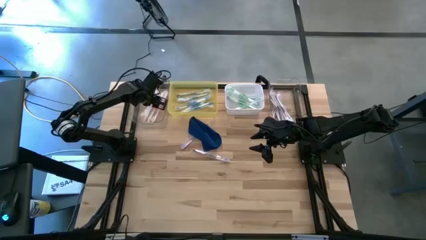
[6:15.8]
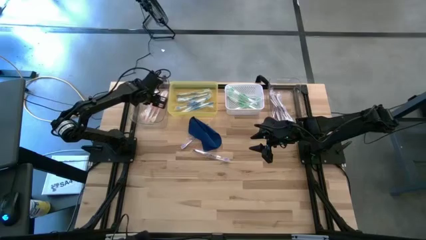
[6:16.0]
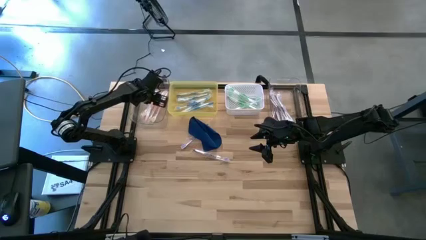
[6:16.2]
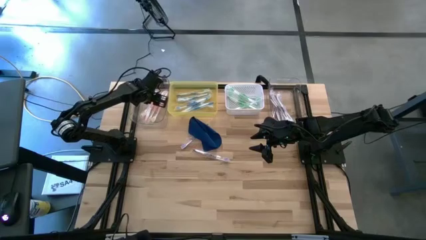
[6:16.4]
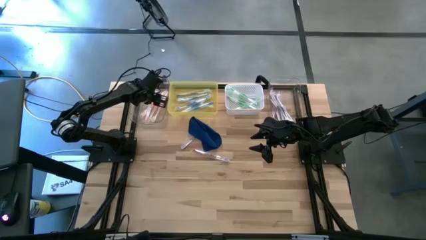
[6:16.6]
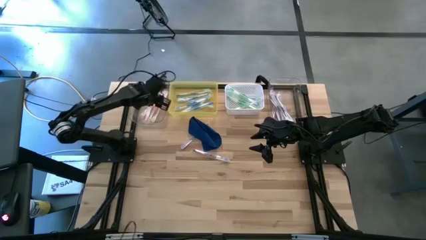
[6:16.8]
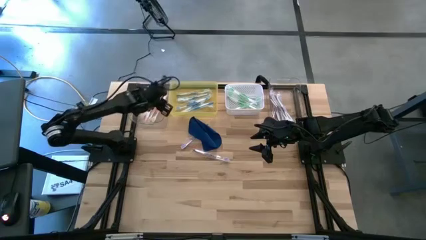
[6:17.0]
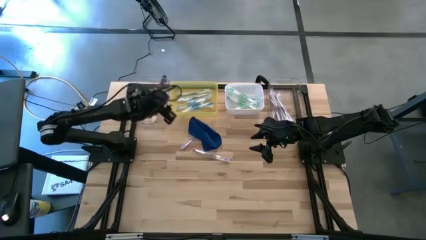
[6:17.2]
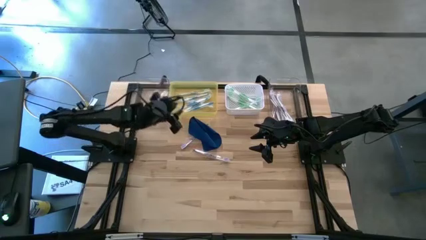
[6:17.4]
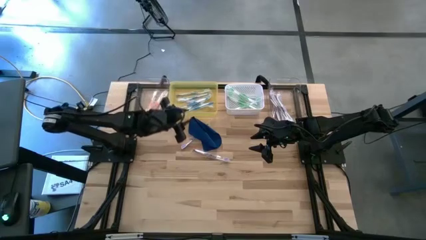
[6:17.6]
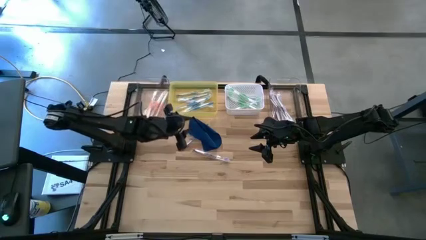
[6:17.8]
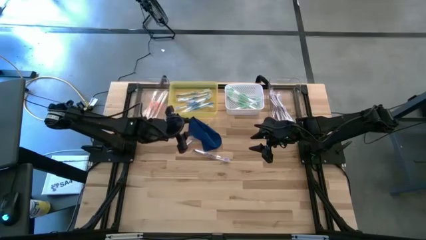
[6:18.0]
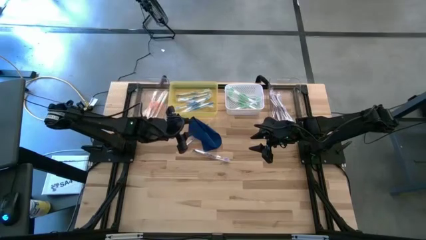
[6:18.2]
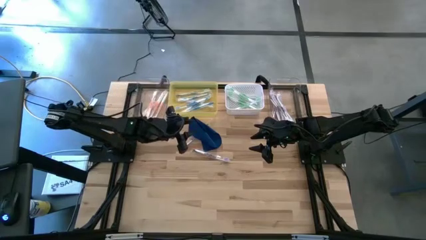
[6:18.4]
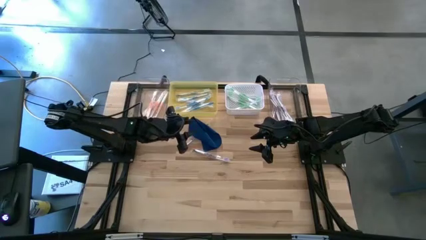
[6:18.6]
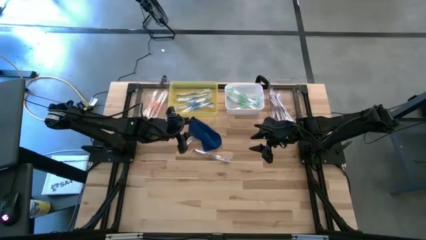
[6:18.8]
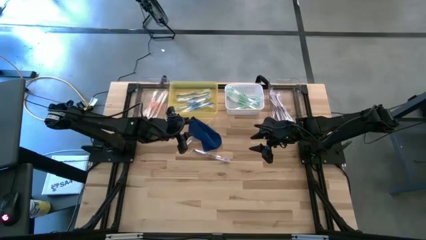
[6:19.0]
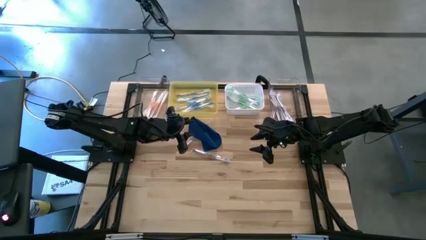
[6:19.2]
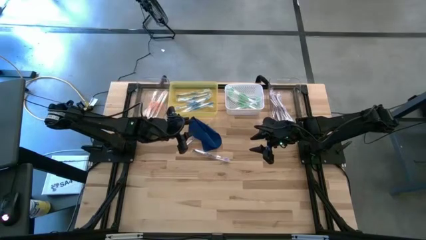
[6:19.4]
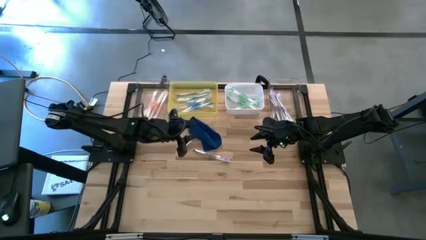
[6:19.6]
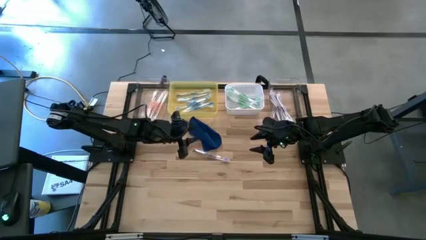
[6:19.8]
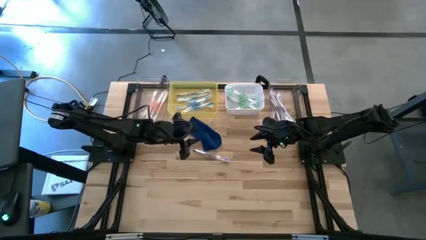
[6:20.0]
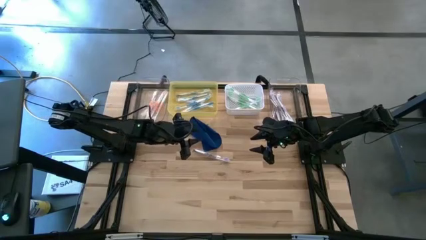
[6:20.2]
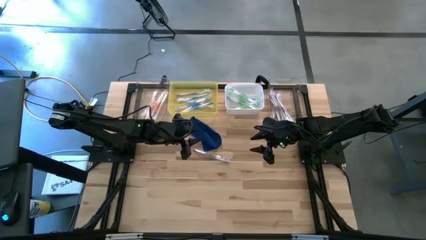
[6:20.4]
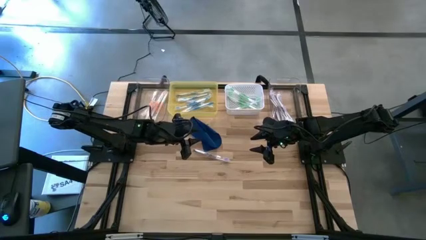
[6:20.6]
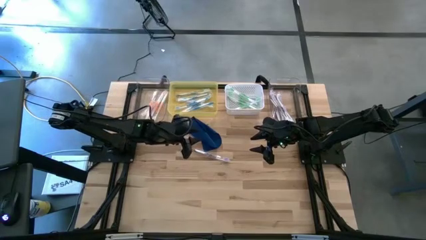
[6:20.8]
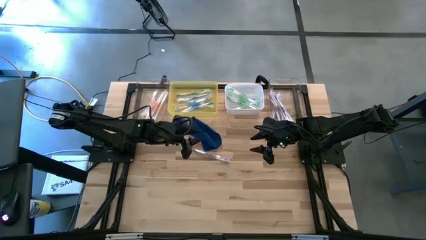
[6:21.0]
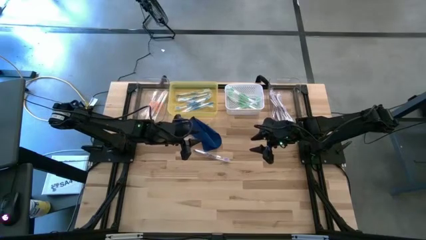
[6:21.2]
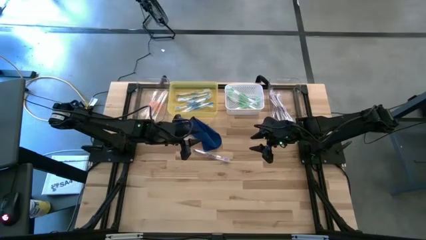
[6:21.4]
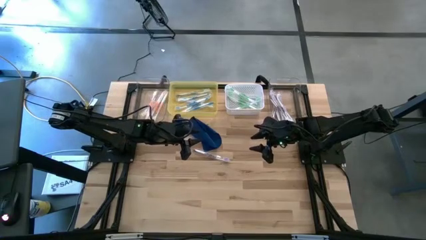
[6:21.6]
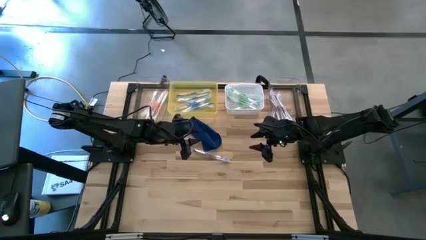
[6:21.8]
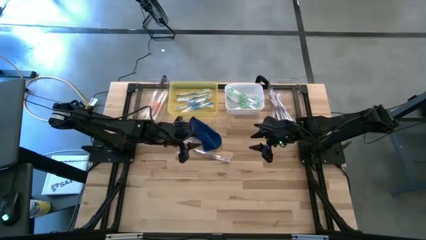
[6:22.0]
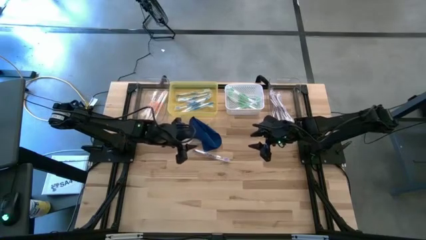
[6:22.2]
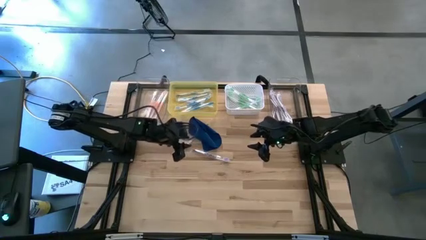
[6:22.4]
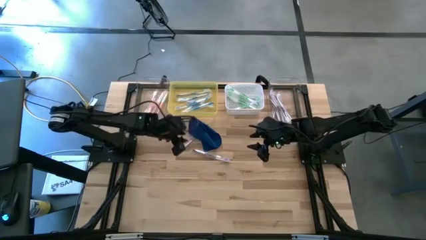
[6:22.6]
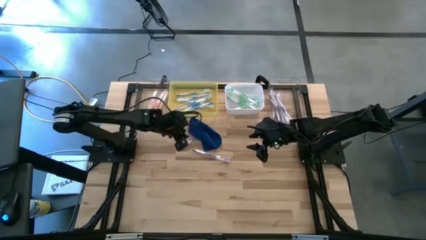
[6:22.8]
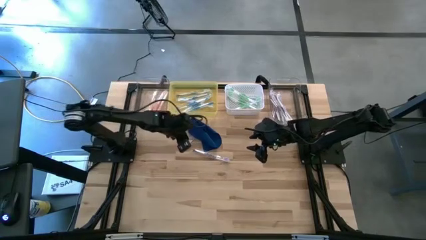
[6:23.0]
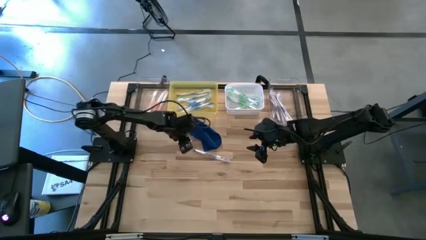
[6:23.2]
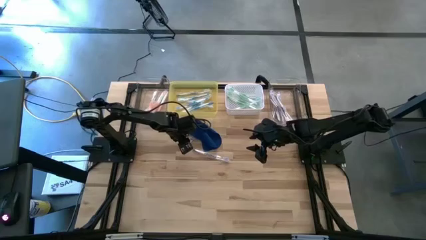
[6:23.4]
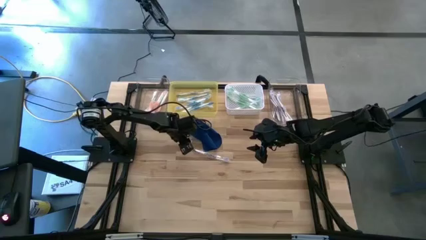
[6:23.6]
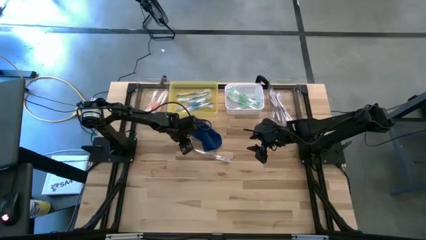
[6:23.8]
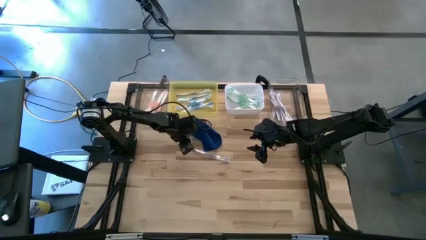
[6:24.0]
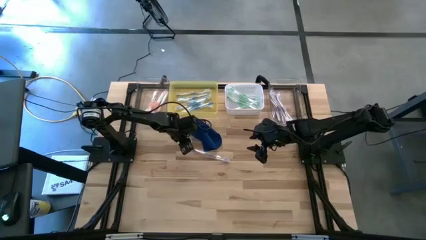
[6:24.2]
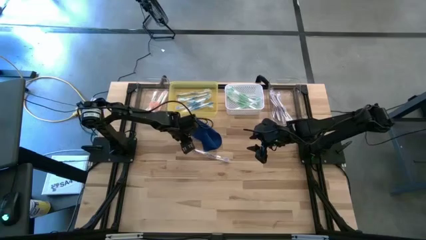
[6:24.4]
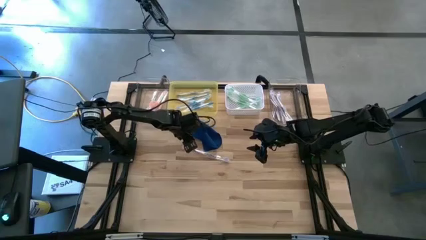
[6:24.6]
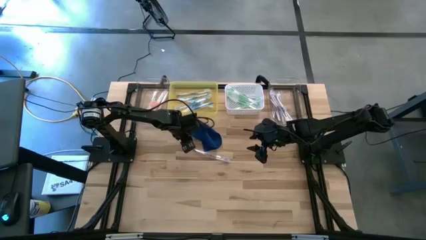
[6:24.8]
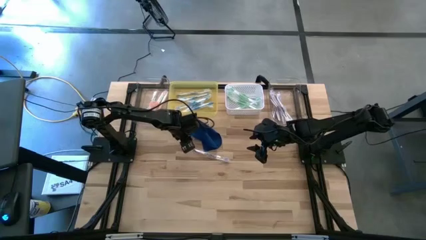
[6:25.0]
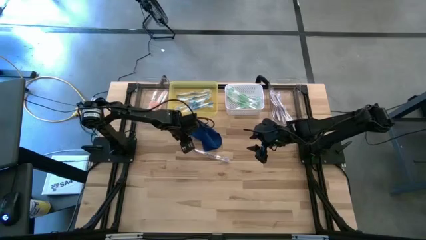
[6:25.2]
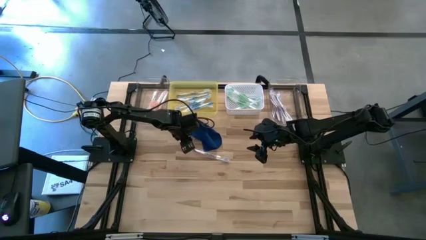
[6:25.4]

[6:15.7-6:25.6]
Task: Pick & Place Toothbrushes
Put the violet toothbrush into the right transparent bin

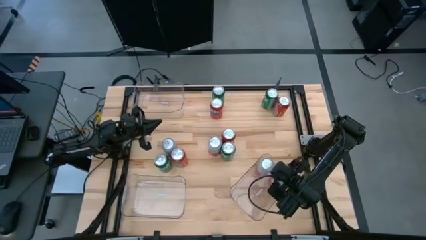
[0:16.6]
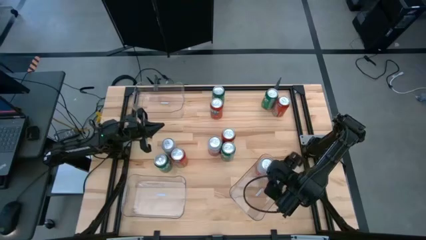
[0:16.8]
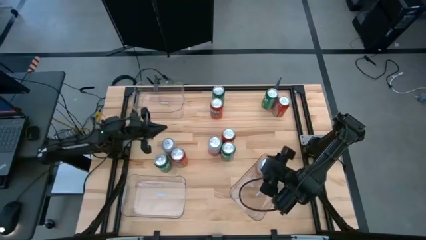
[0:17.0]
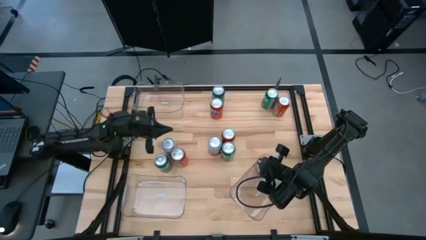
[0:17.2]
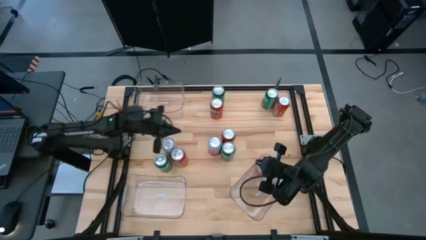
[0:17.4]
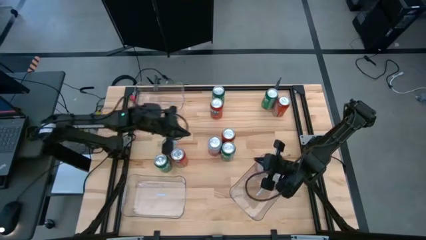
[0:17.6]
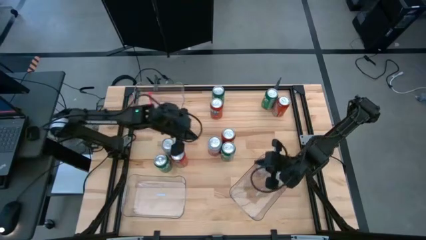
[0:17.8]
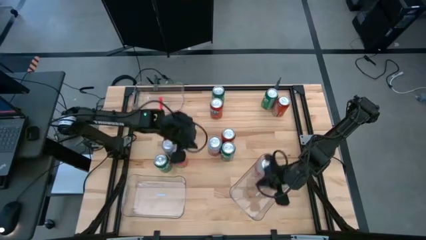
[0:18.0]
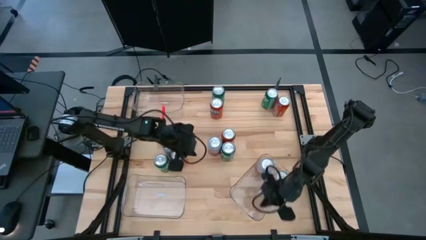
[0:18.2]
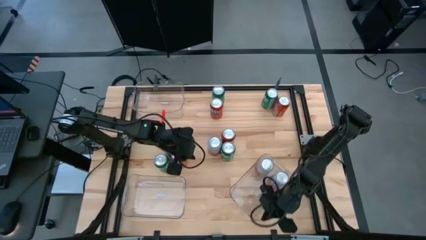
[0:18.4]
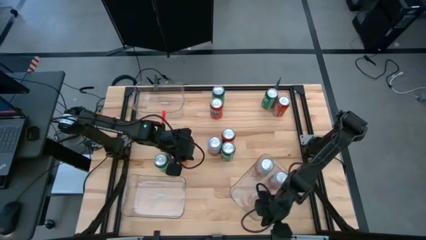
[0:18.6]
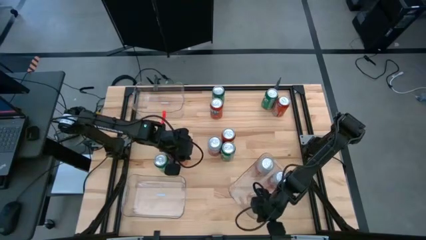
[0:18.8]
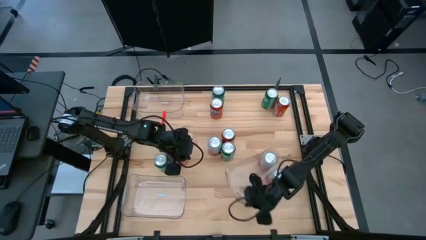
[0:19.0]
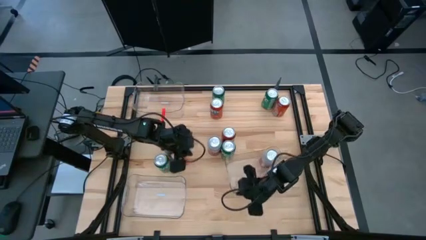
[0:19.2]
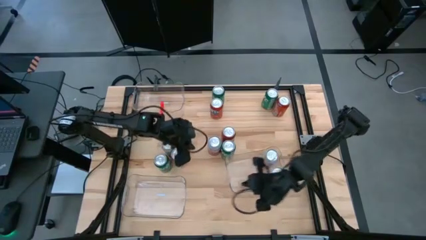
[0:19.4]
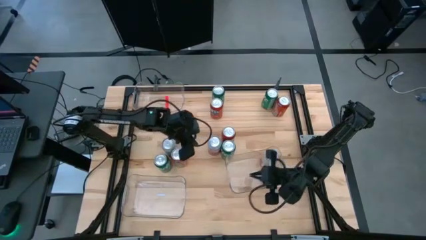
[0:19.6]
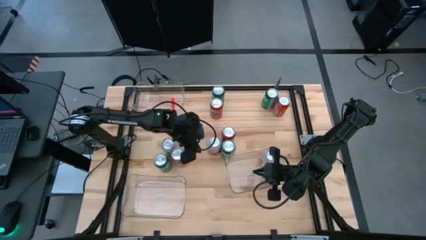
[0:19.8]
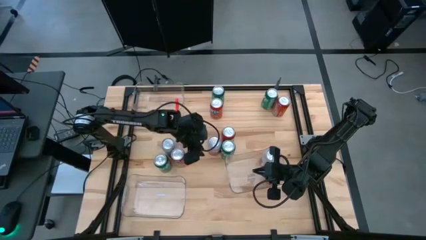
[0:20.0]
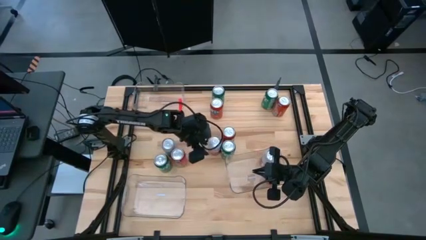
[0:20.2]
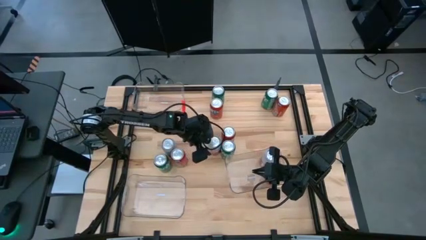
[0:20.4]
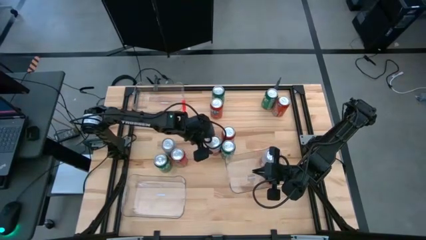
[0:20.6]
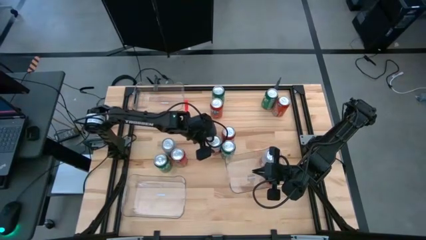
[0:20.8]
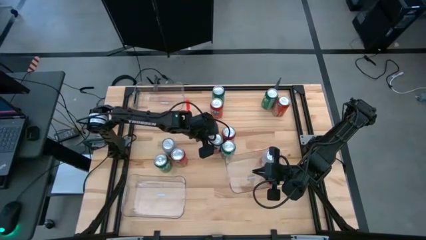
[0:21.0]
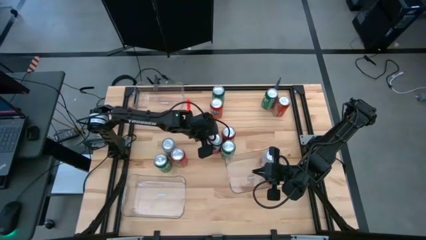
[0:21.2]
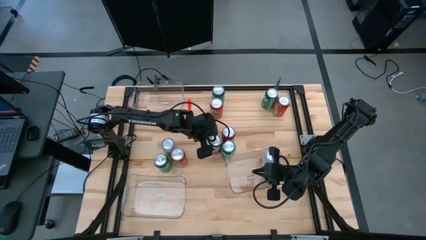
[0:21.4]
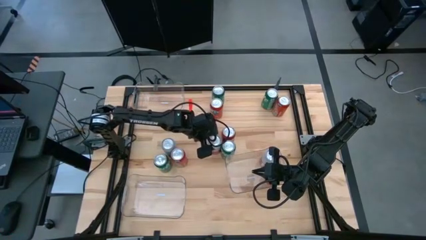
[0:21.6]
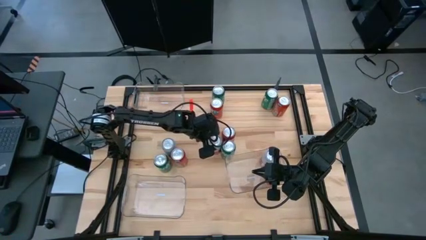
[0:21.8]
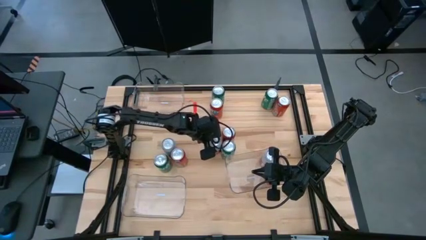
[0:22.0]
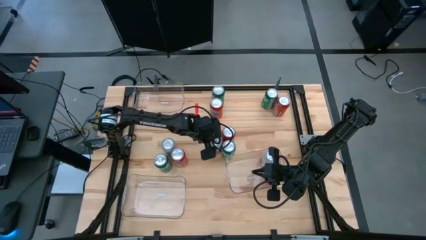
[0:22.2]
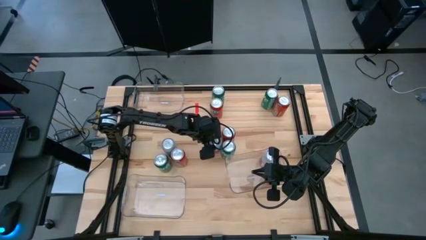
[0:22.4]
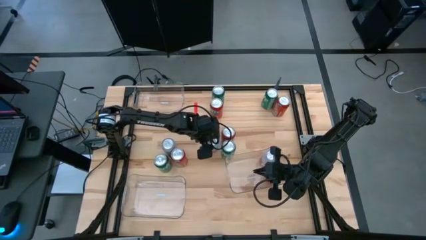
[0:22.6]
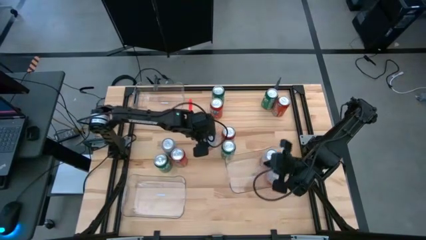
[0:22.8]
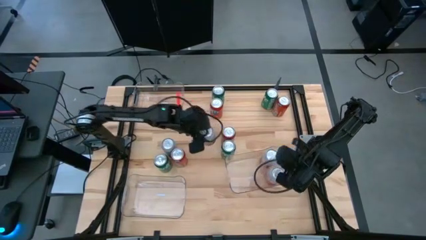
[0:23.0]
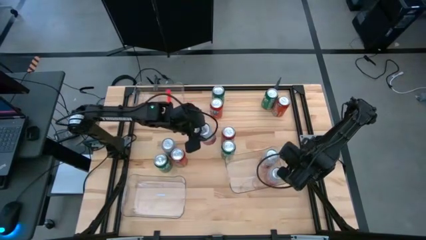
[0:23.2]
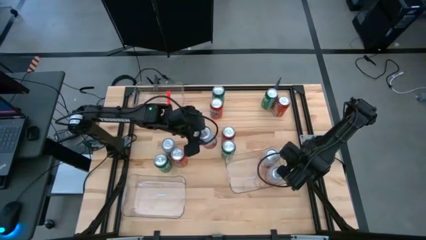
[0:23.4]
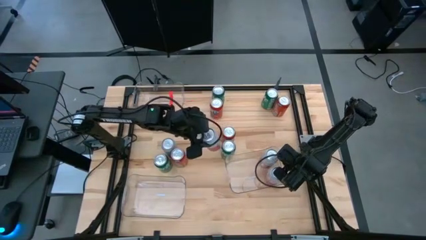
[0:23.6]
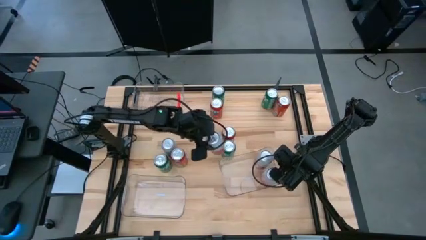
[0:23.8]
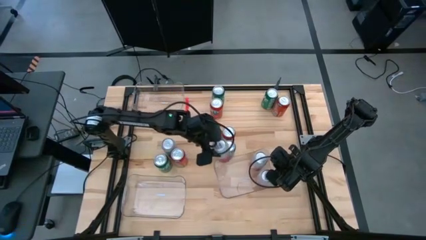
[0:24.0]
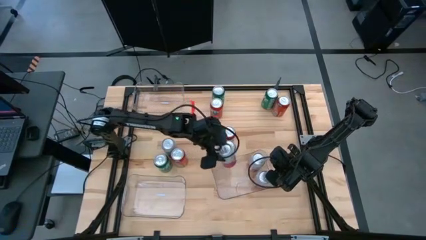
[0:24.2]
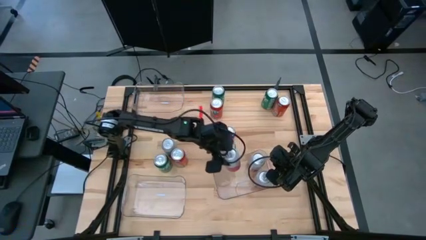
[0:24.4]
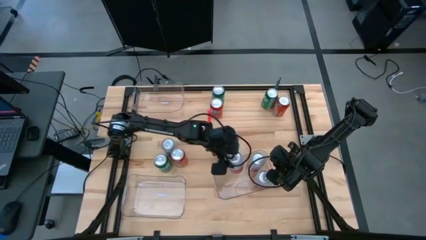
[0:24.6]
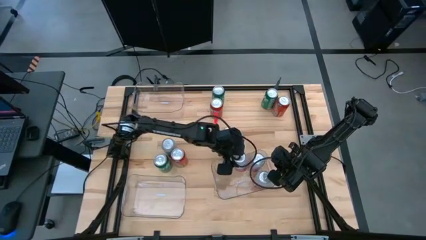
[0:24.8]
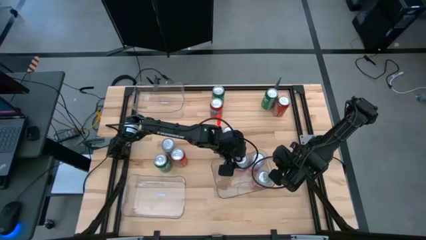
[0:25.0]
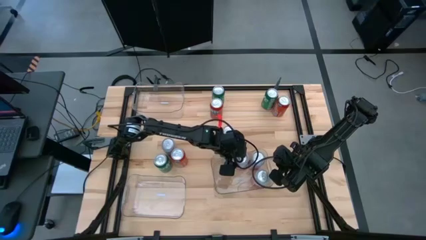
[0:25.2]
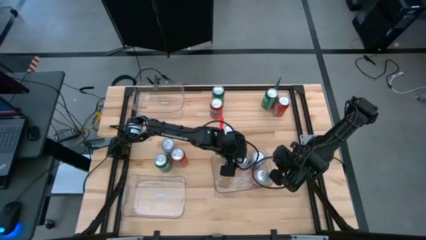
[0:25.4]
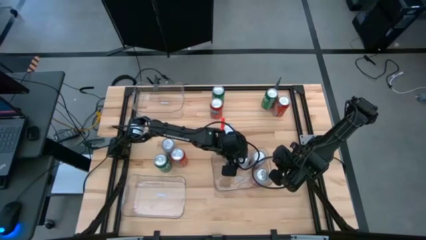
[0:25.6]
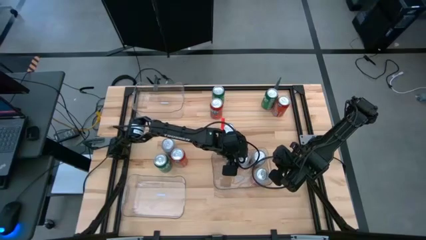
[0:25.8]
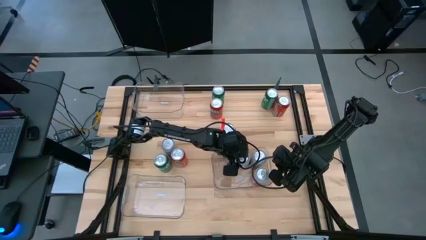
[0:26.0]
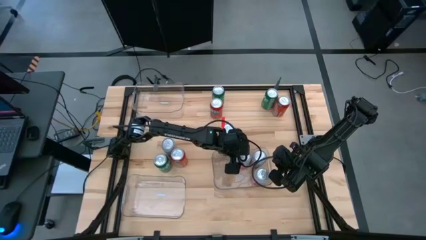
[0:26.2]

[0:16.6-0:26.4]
Task: Sort soda cans
Put the pink/white soda can into the bottom right transparent bin
